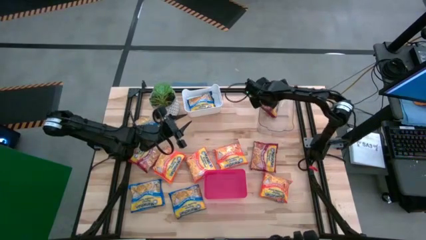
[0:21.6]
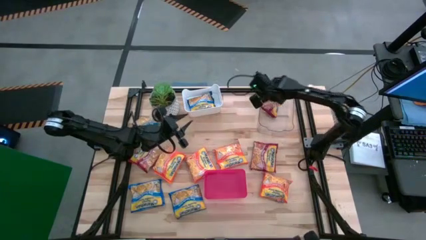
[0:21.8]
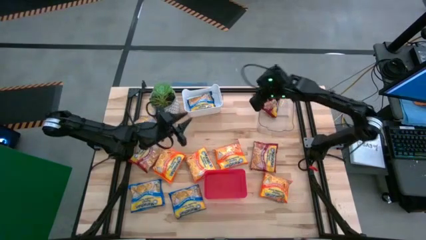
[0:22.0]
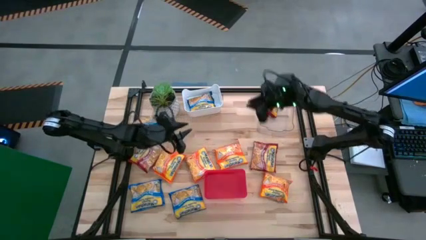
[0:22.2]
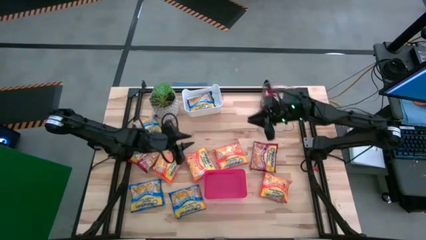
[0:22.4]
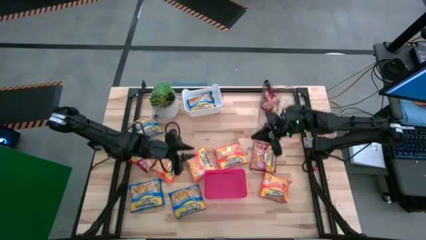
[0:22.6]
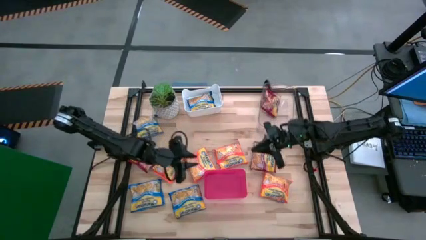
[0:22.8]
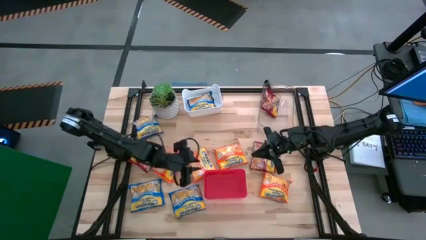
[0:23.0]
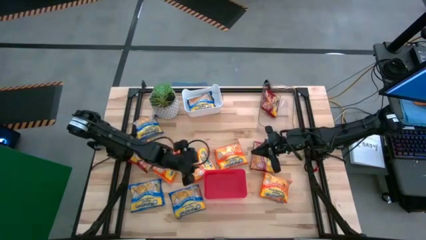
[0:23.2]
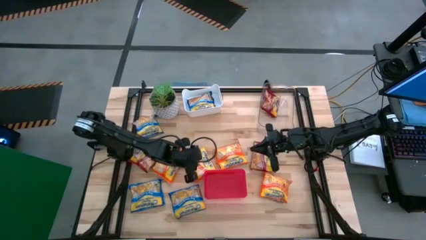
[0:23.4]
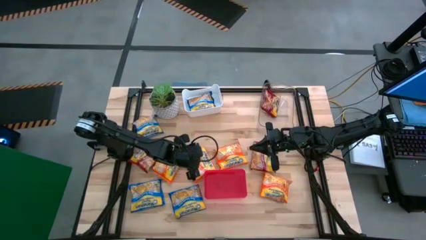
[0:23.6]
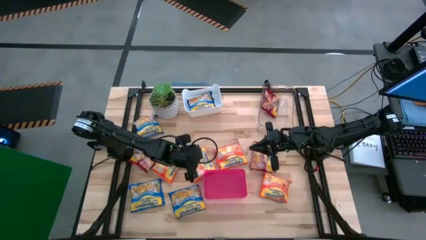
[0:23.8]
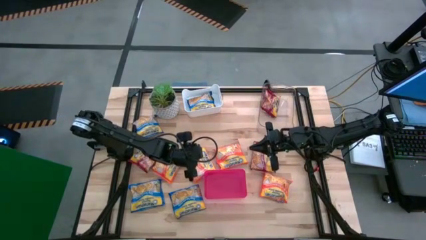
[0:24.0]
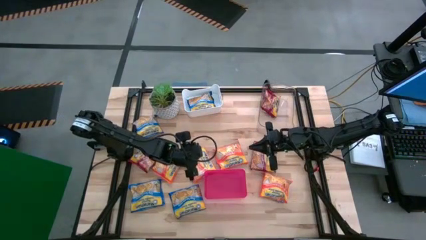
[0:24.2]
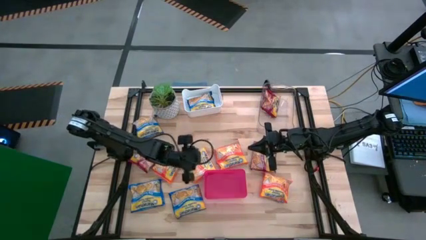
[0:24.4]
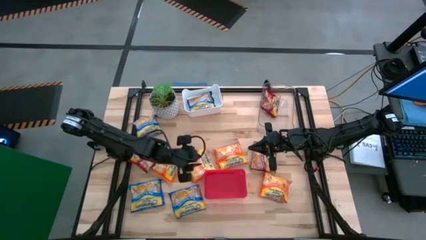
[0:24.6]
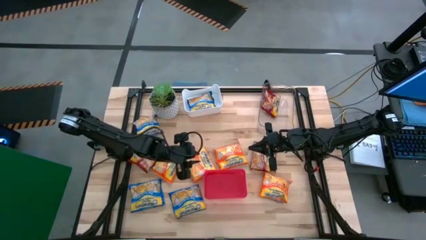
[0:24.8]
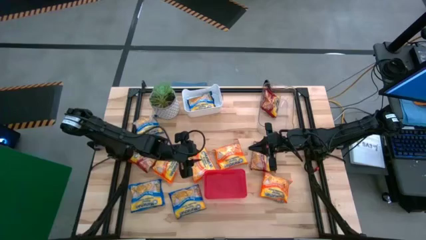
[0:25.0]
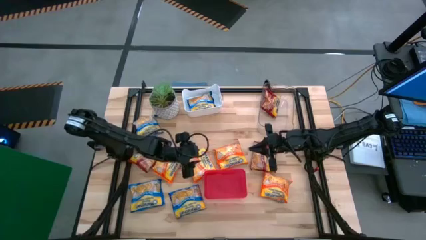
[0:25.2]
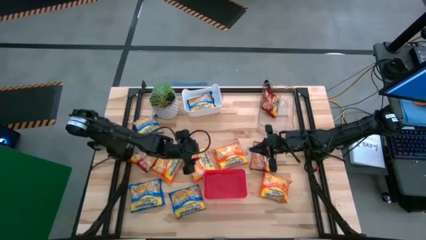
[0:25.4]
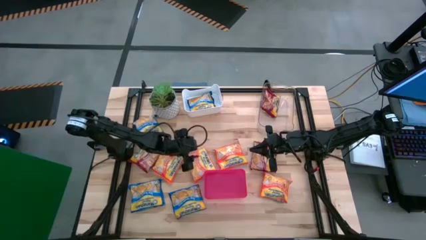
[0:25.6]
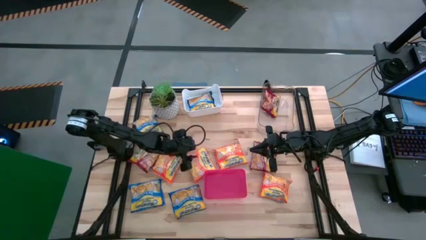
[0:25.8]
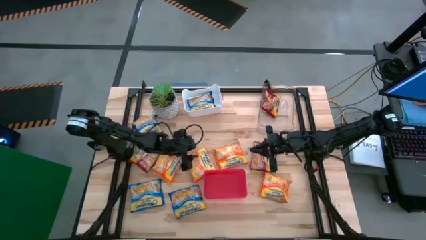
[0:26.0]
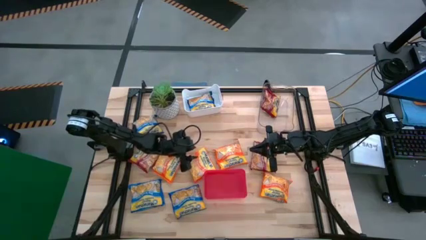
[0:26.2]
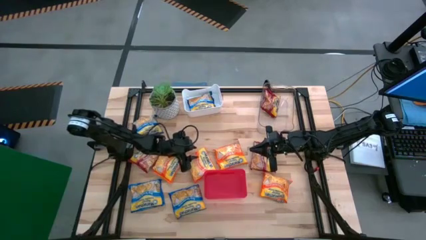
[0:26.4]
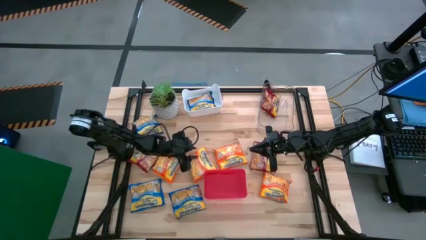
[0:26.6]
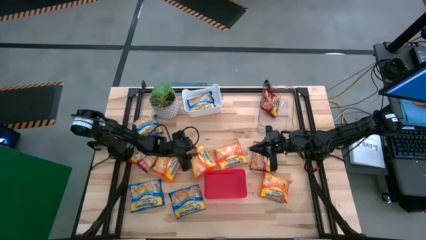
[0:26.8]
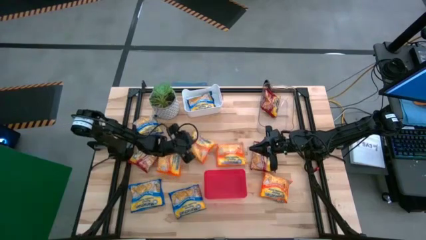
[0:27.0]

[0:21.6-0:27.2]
Task: Sort Maruchan noodles
Put the orange noodle pack into the red bin

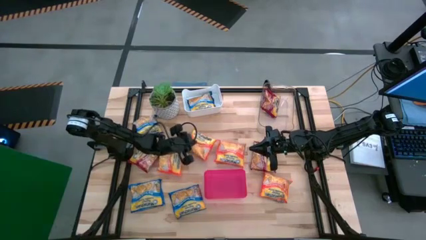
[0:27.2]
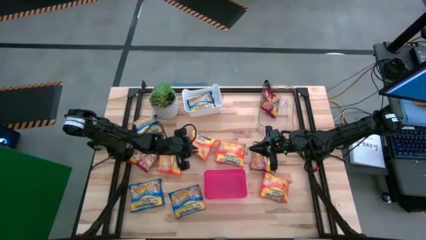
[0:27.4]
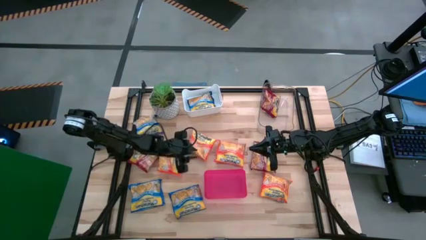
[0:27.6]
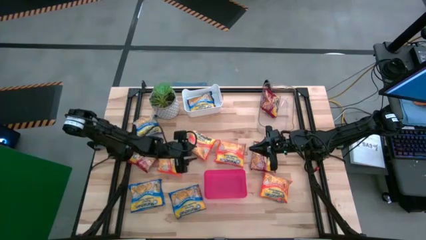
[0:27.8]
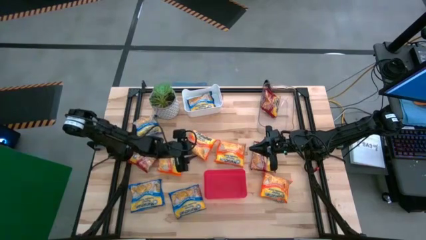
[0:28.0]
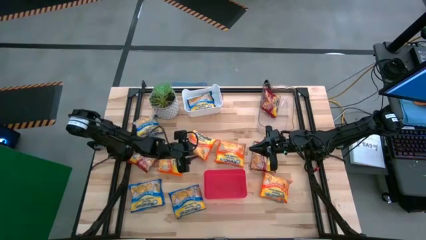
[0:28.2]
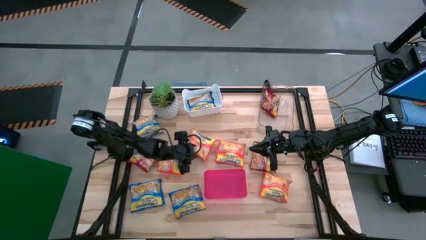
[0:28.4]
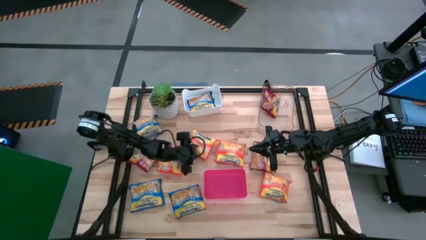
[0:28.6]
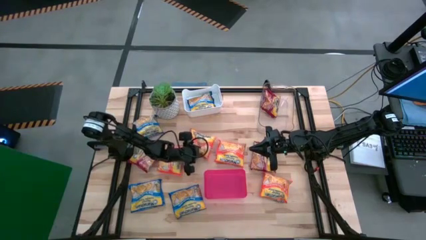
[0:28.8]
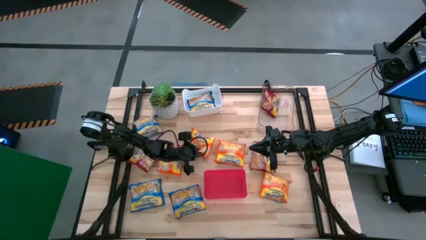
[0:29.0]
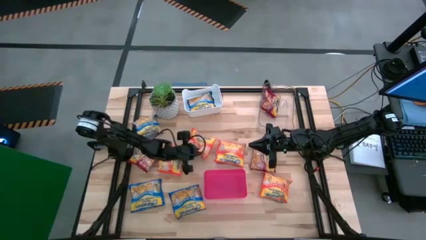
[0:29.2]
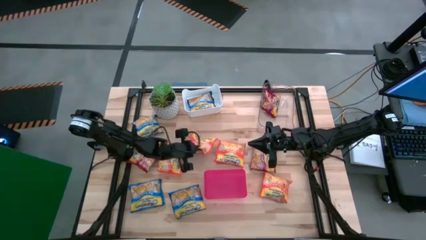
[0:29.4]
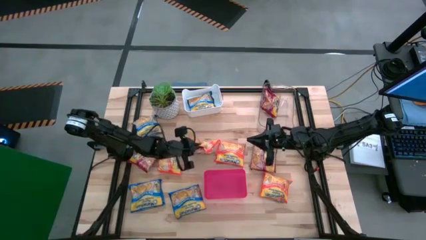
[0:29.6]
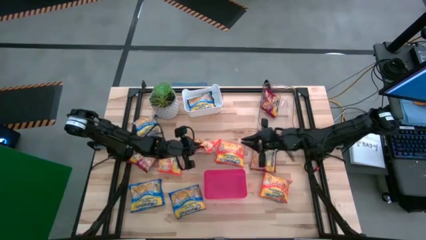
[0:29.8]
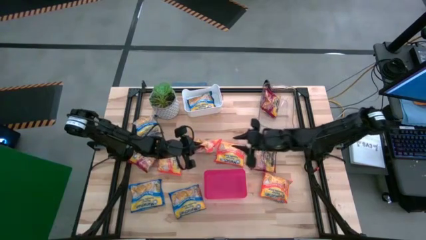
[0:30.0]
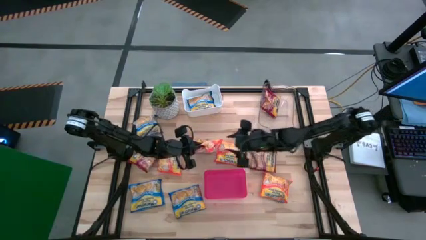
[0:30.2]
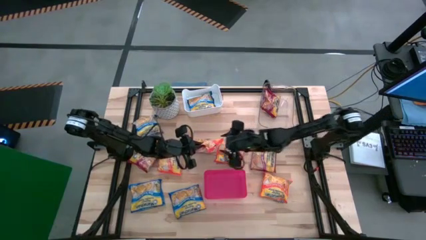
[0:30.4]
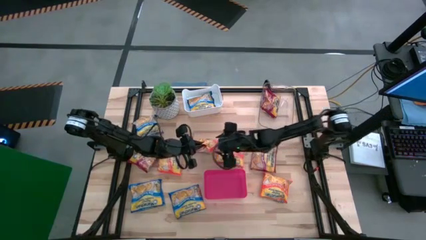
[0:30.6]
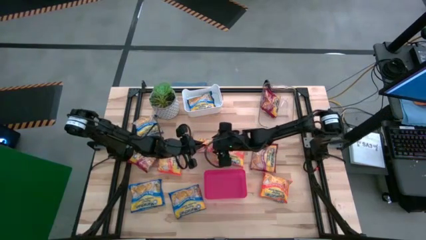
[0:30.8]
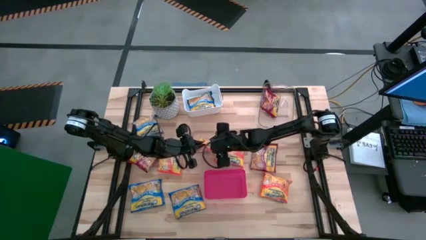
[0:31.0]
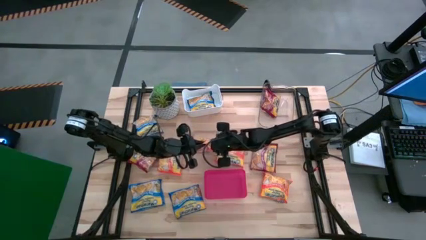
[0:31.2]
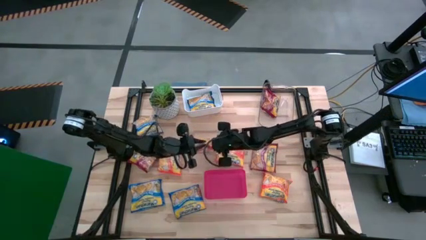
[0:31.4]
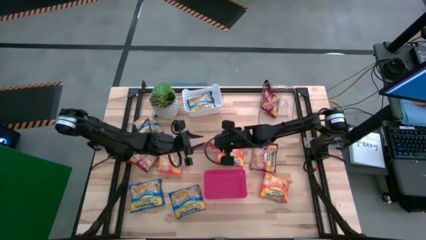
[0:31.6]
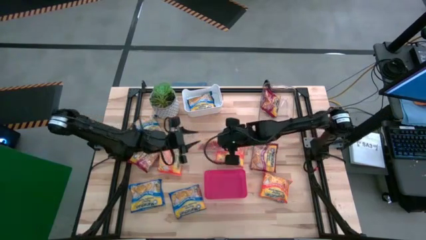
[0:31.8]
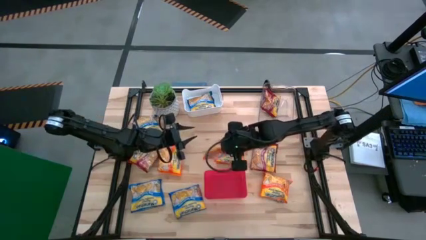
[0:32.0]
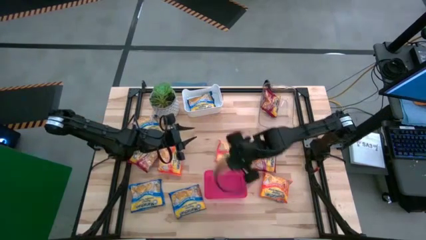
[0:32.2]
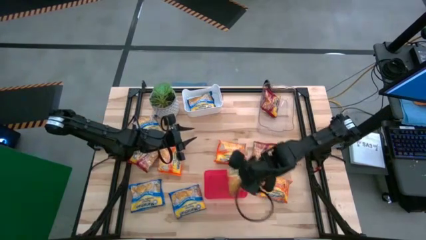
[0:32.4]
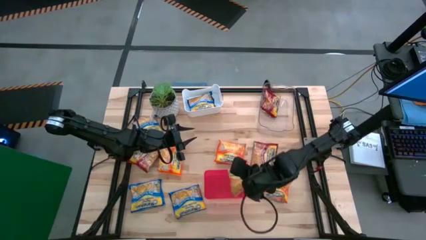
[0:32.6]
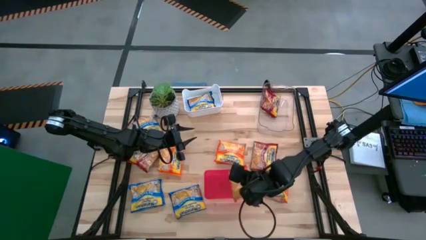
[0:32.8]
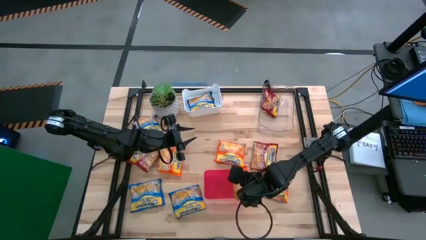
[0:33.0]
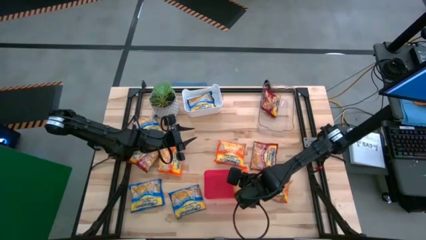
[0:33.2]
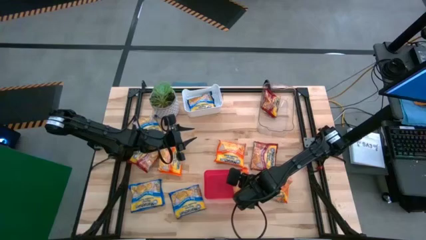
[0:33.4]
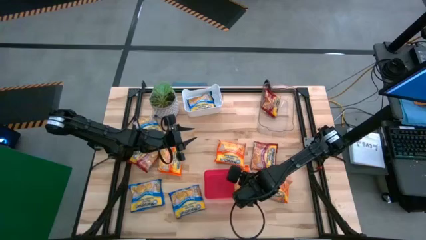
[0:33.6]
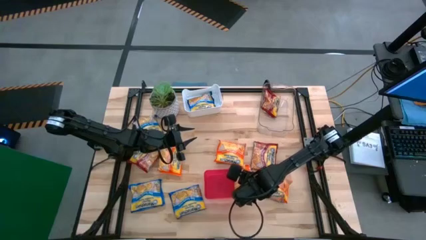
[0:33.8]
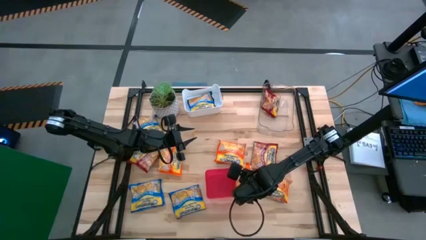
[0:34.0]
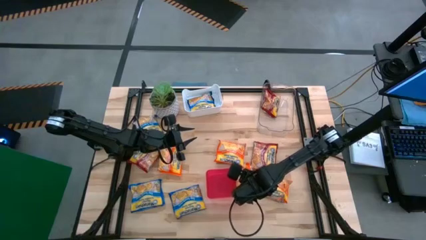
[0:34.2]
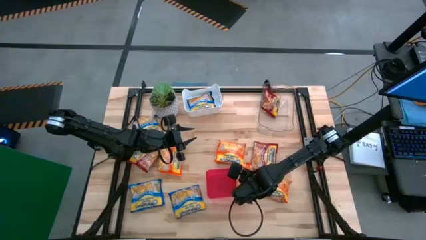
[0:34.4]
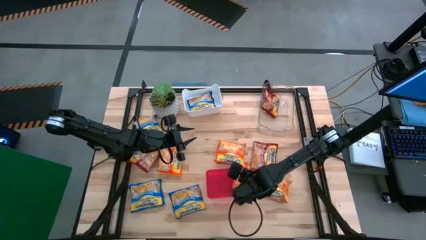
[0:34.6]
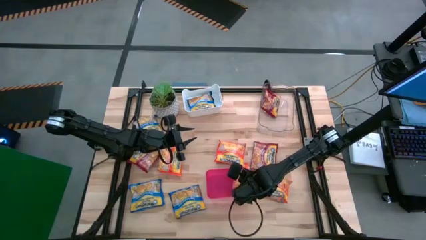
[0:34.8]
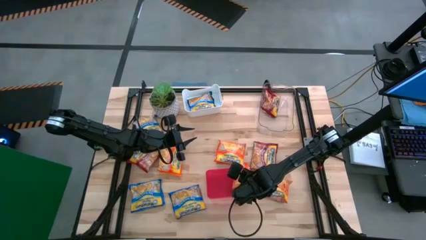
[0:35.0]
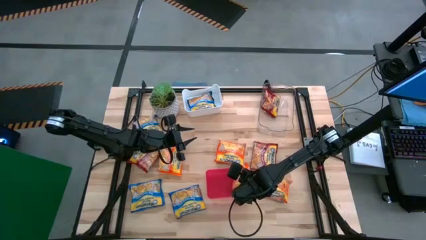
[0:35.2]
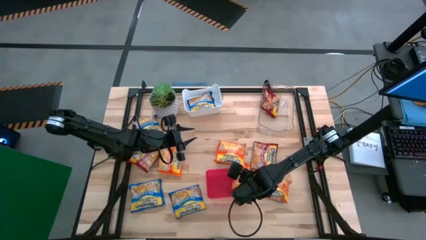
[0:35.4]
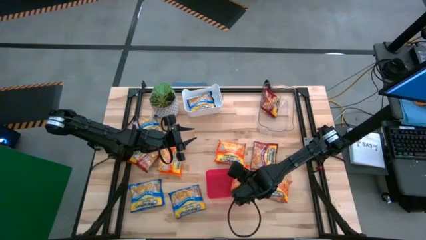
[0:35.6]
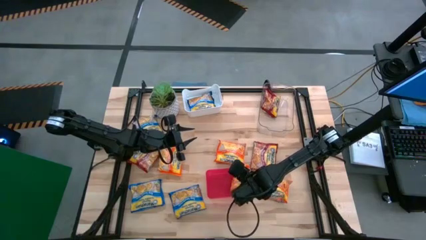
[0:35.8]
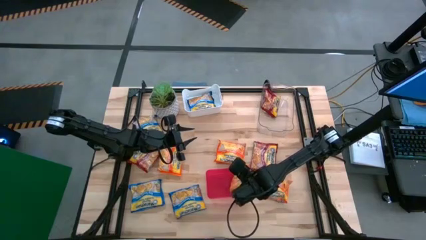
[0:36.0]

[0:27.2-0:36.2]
Put the orange noodle pack into the red bin

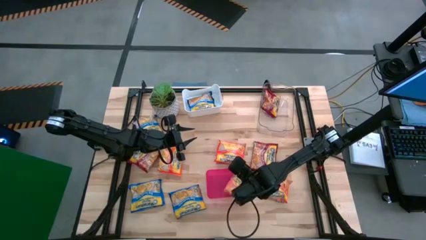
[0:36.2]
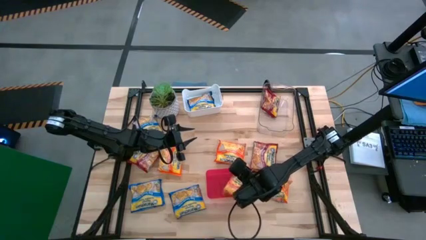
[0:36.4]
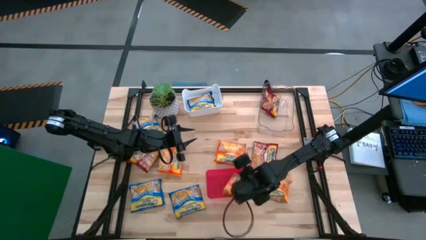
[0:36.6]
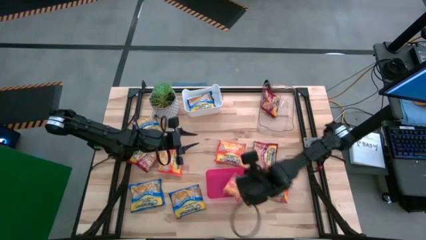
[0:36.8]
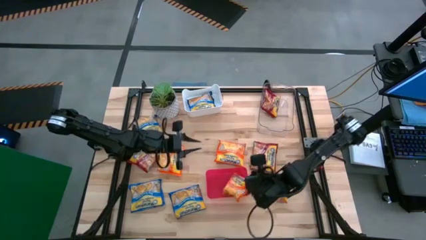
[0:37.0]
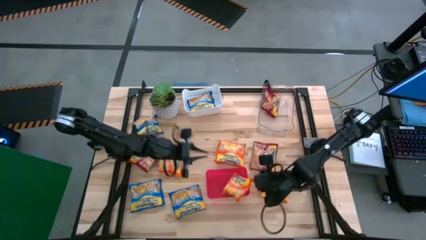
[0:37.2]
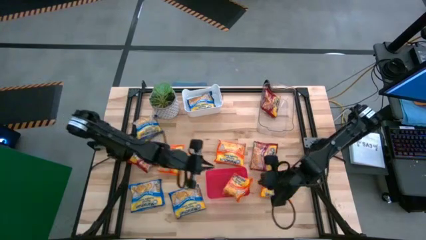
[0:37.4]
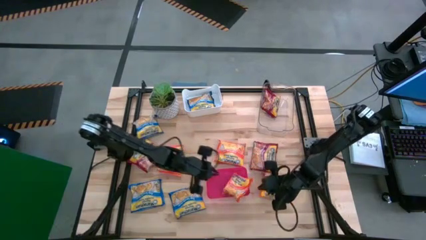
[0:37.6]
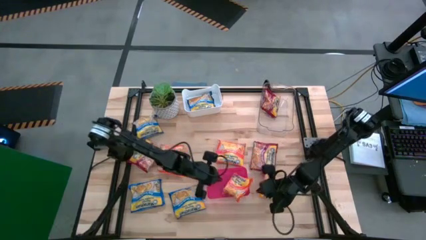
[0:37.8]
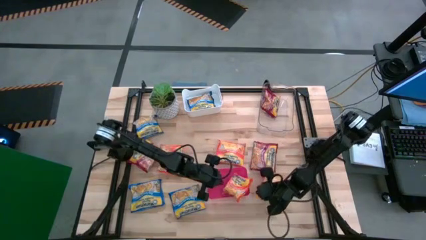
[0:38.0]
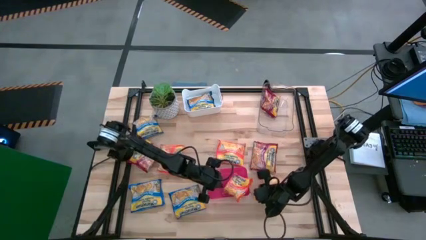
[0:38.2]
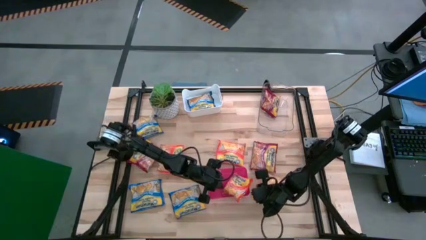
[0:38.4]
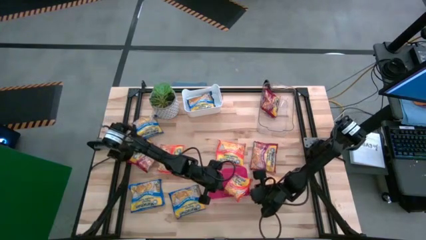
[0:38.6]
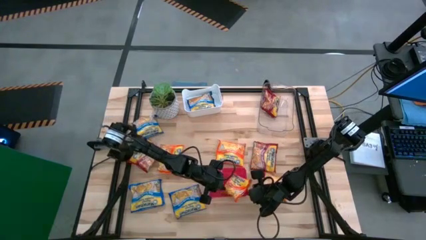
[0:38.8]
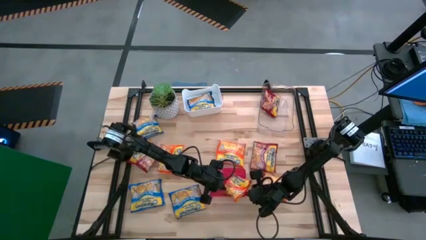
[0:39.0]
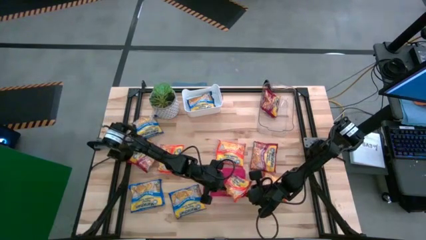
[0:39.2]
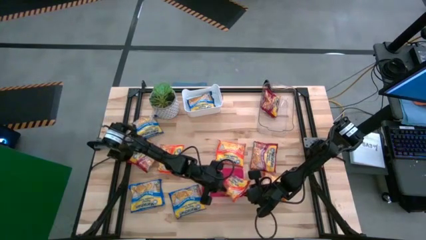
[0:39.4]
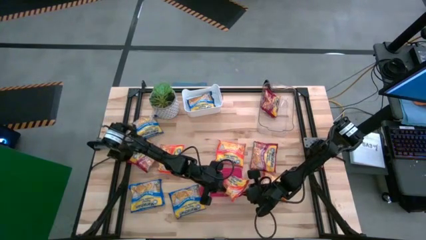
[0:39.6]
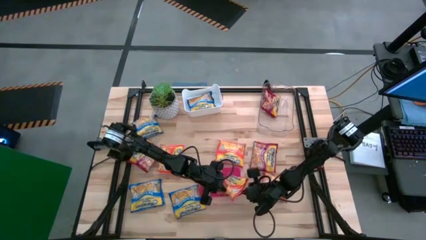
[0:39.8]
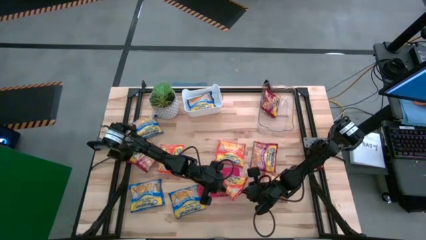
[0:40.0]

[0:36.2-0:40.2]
Adjust the red bin
